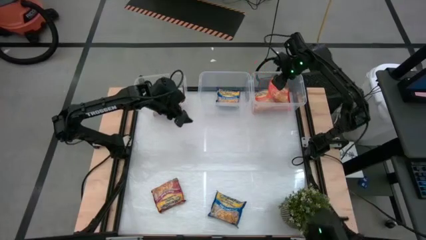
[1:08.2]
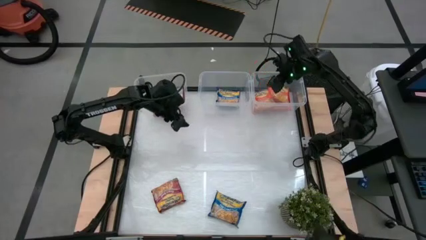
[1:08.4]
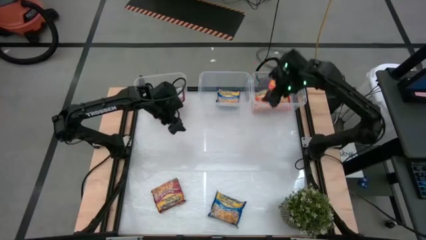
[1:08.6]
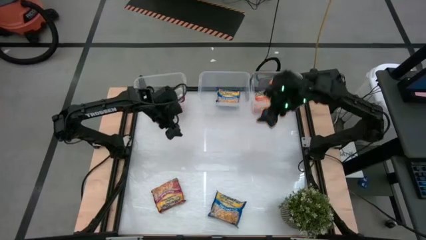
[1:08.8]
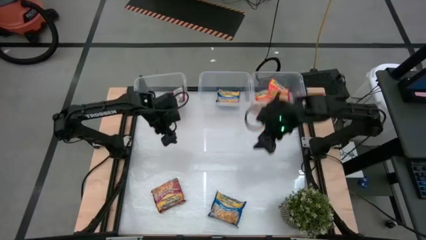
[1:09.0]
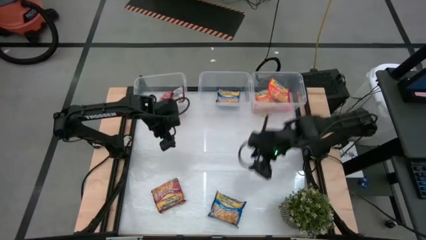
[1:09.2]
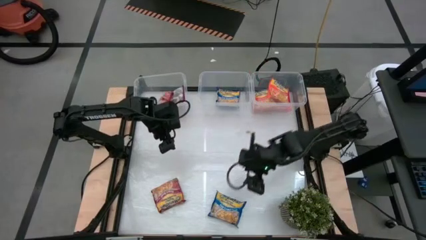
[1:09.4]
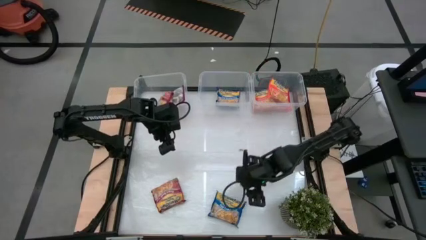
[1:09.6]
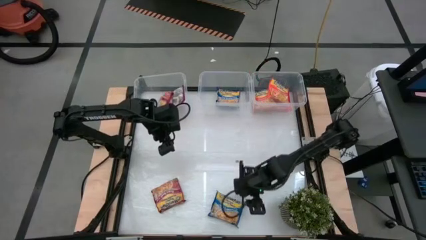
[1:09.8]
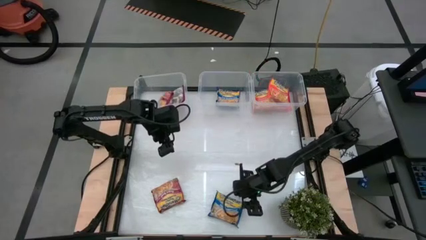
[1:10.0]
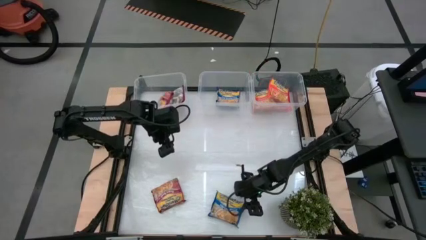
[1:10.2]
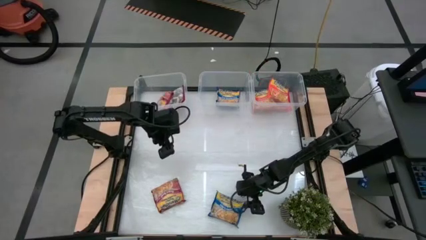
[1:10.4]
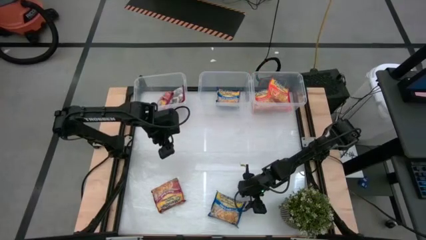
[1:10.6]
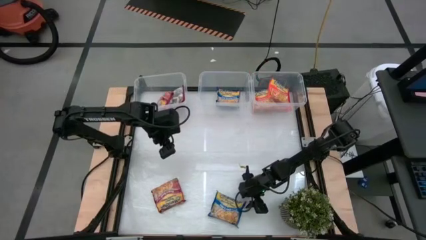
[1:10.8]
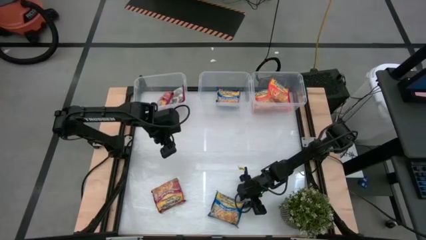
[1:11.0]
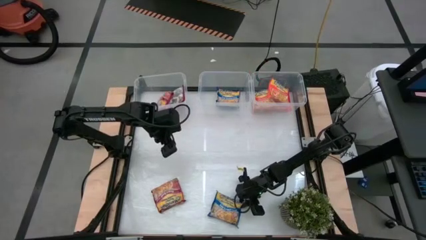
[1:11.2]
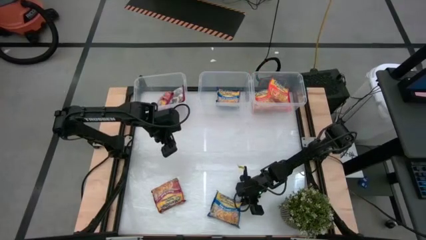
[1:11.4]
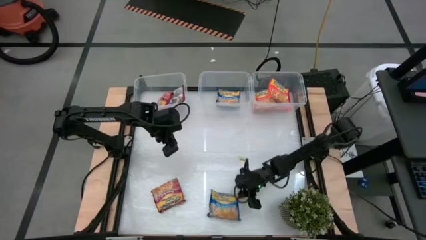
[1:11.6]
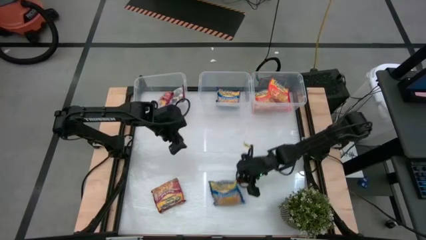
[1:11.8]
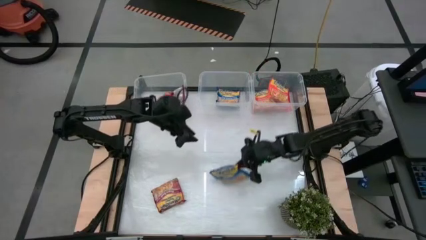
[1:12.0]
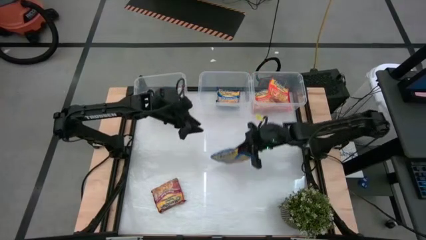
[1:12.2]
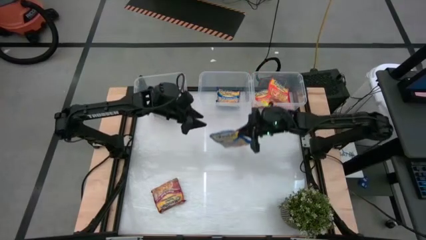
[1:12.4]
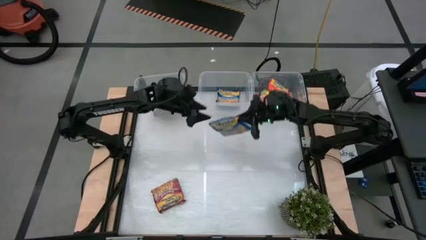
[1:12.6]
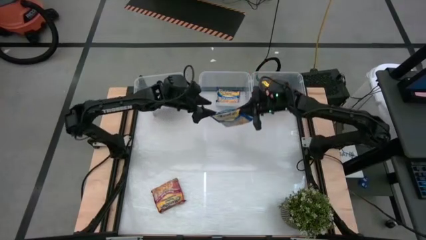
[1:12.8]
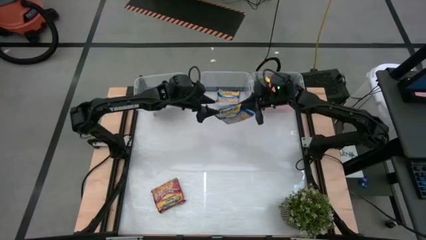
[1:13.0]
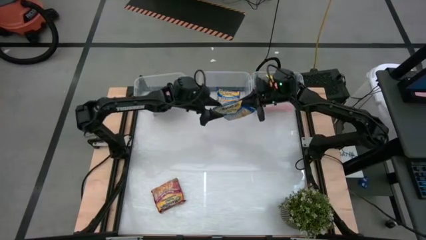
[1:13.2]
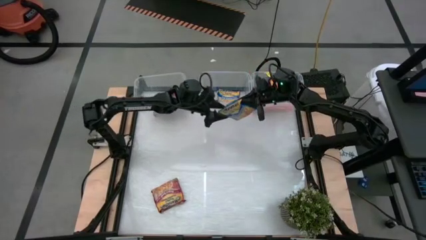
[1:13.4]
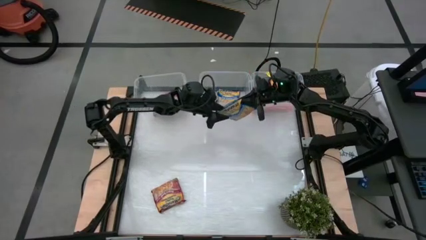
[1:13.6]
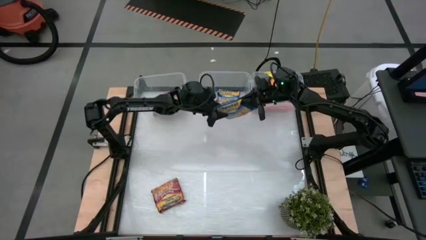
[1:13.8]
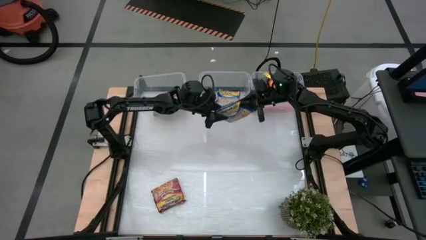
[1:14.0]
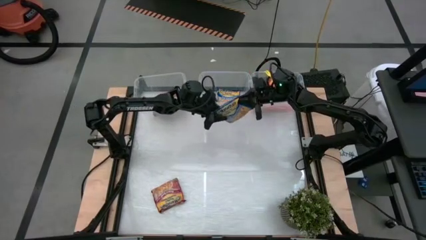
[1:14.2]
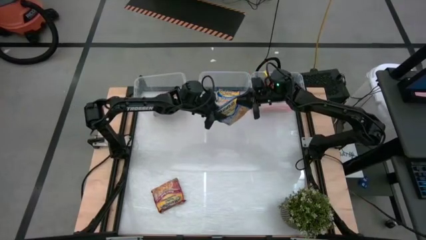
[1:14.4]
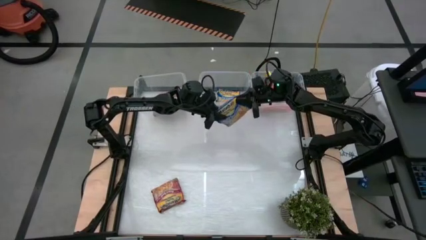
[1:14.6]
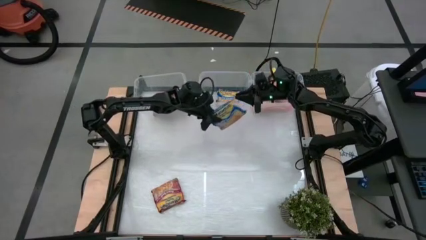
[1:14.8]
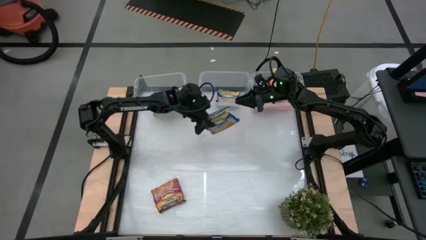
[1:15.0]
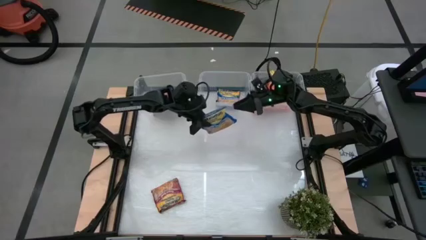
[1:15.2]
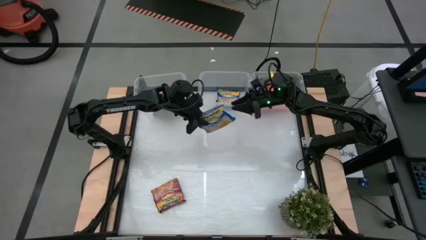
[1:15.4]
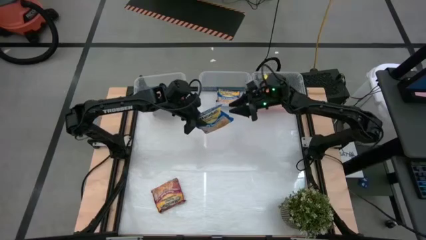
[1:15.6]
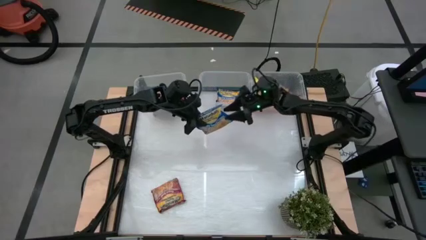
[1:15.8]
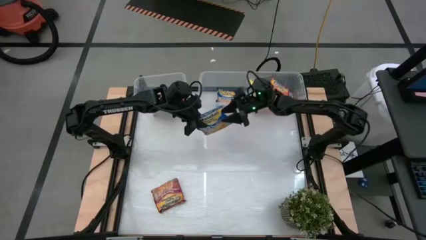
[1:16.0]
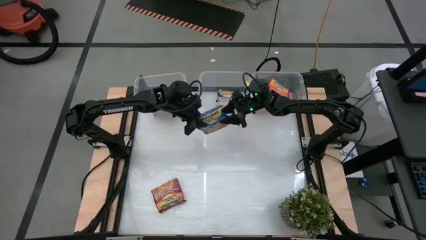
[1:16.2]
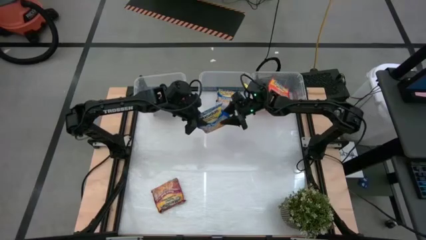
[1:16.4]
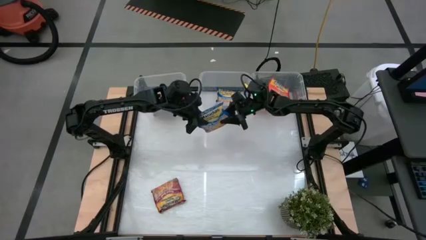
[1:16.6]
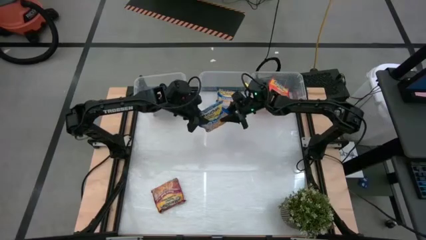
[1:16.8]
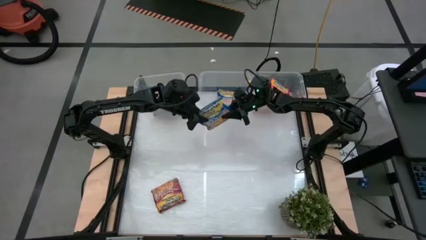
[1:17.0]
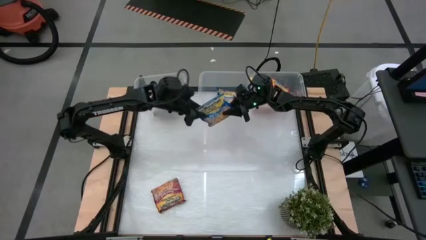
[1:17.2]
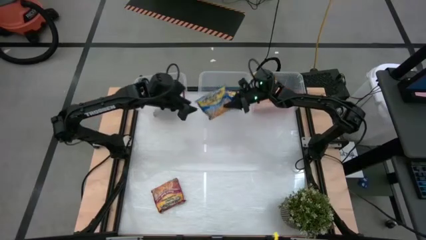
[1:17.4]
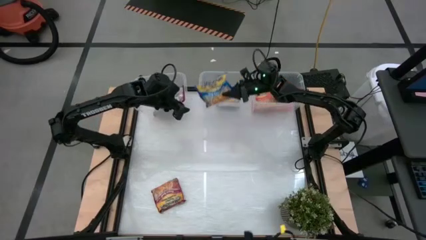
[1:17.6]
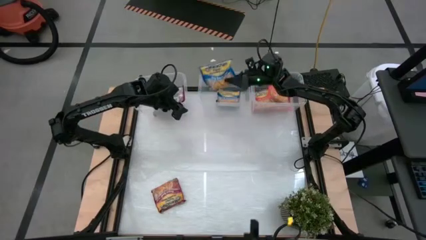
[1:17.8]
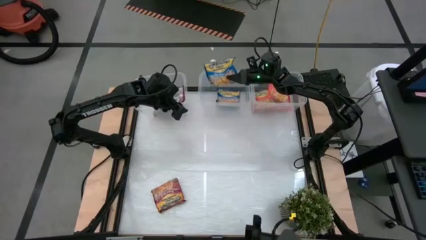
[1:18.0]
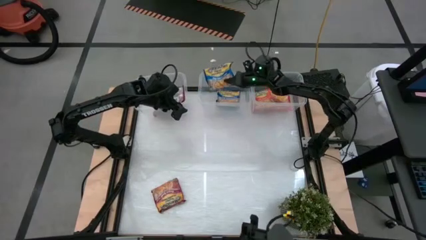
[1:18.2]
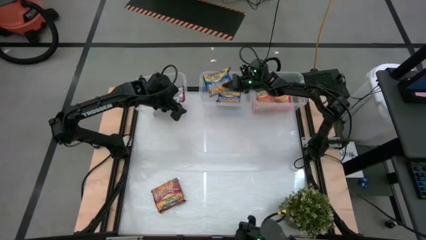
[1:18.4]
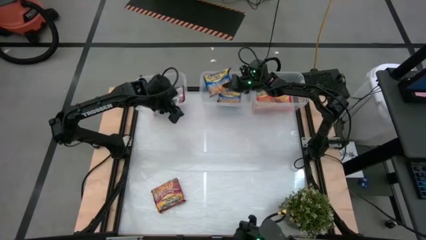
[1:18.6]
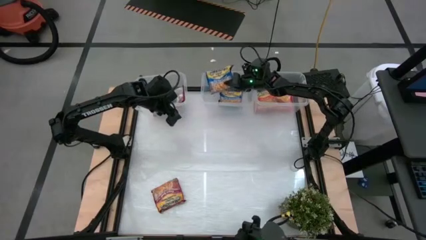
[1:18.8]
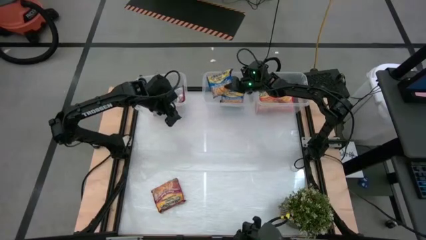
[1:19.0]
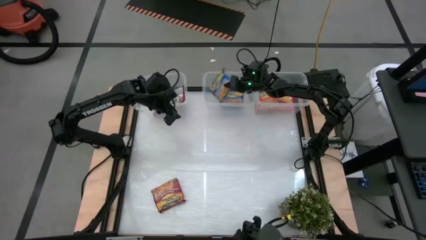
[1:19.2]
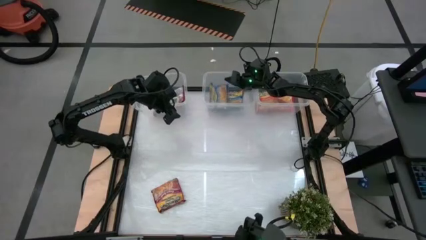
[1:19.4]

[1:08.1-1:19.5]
Task: Sort Maruchan noodles
Put the blue noodle pack into the middle transparent bin

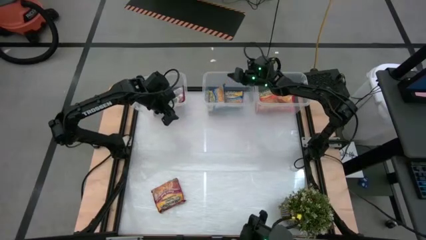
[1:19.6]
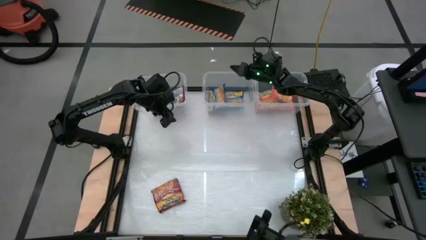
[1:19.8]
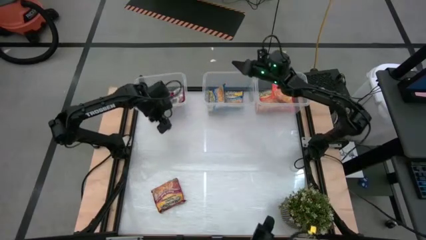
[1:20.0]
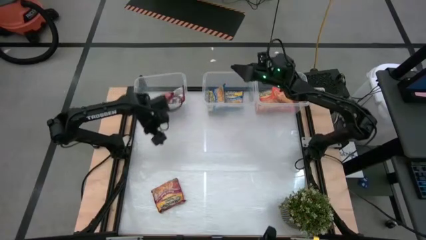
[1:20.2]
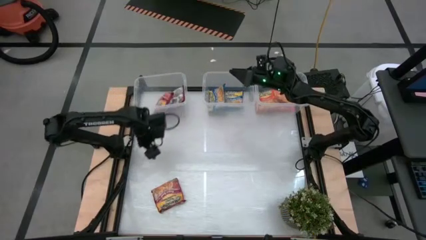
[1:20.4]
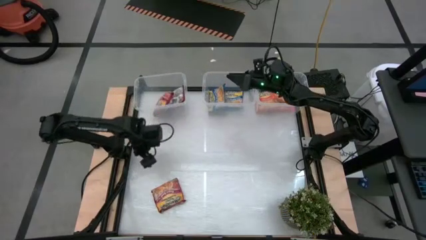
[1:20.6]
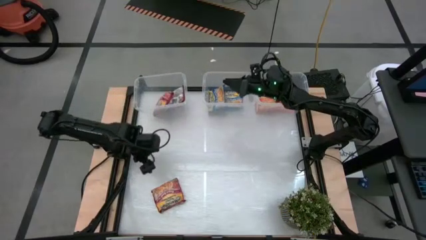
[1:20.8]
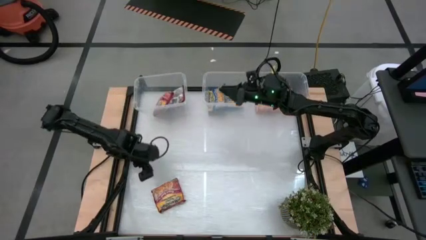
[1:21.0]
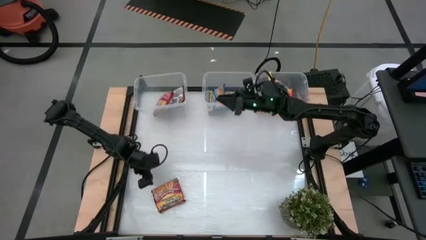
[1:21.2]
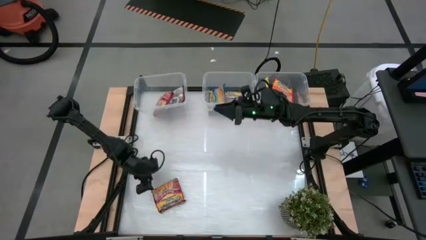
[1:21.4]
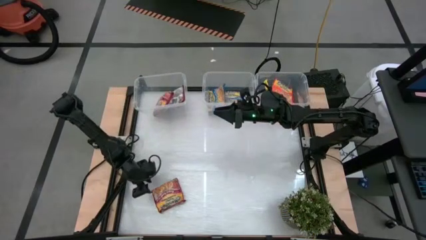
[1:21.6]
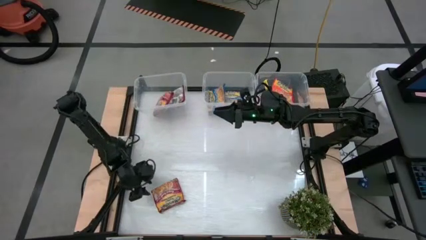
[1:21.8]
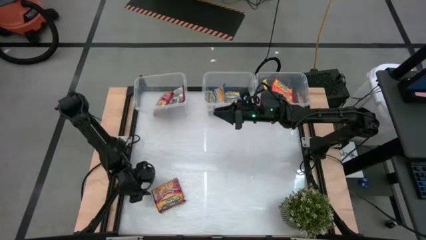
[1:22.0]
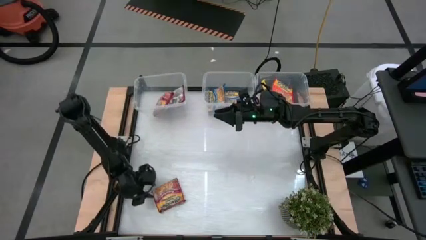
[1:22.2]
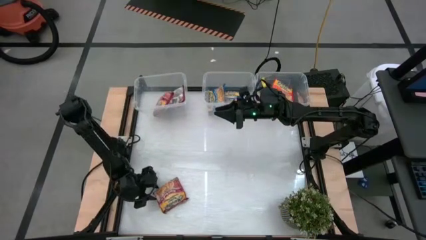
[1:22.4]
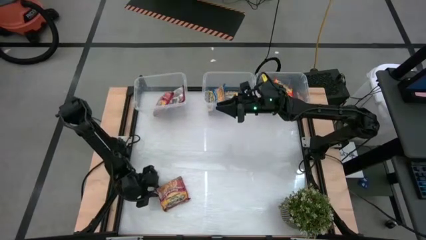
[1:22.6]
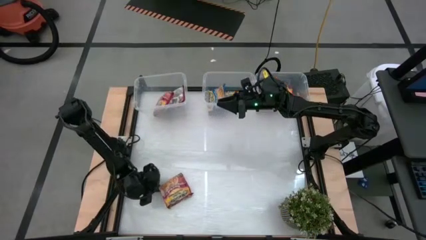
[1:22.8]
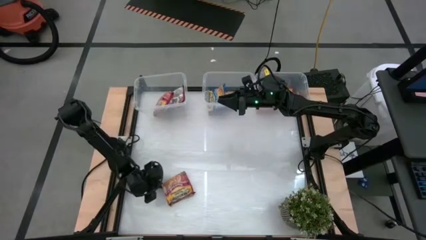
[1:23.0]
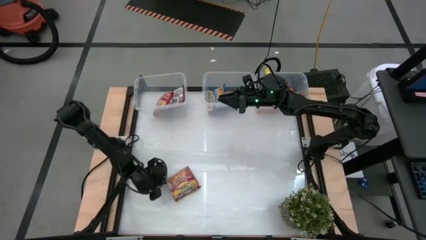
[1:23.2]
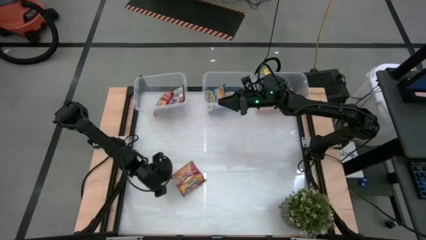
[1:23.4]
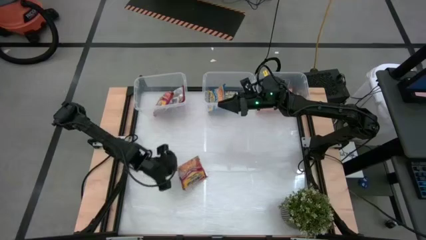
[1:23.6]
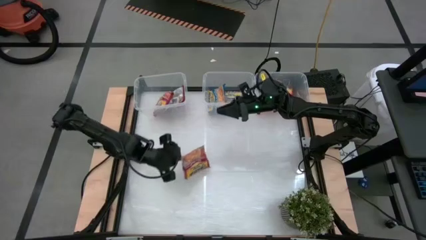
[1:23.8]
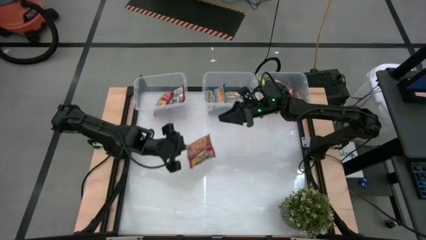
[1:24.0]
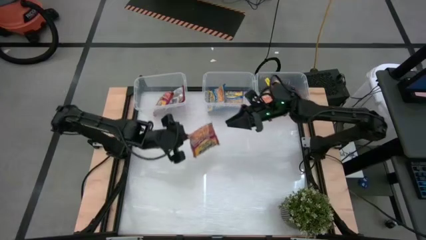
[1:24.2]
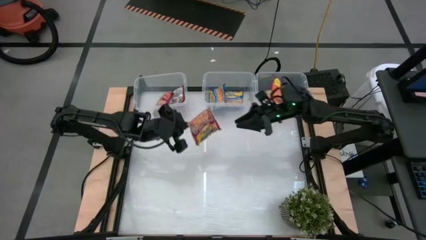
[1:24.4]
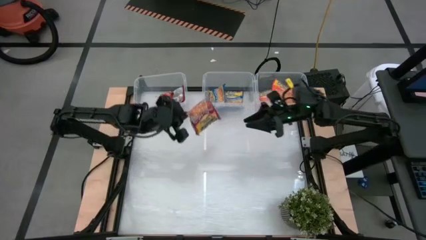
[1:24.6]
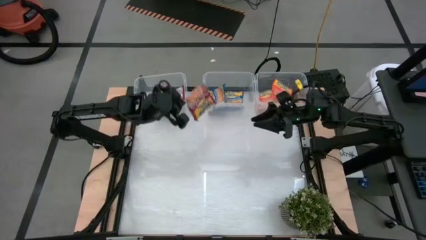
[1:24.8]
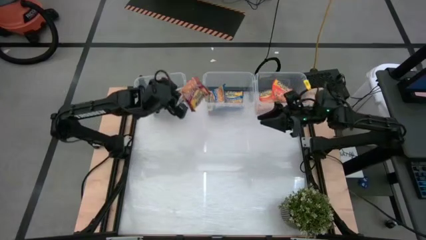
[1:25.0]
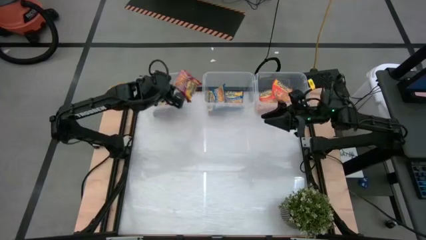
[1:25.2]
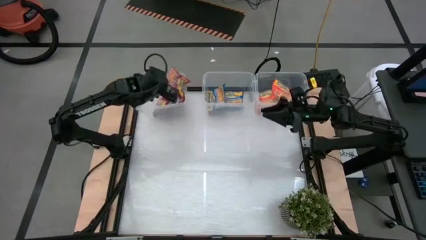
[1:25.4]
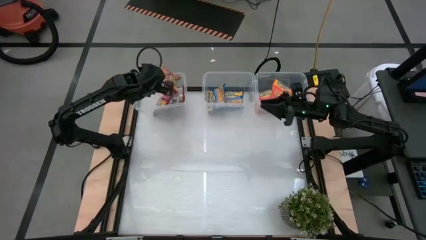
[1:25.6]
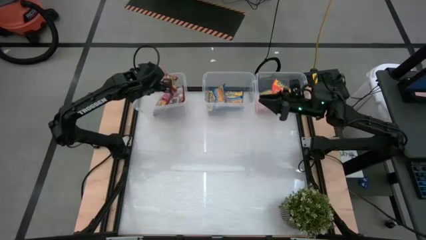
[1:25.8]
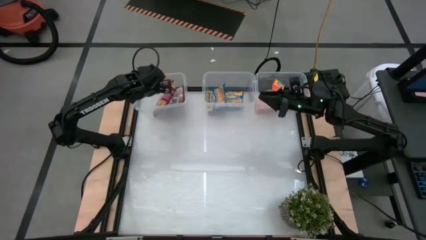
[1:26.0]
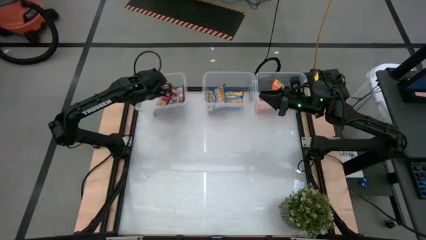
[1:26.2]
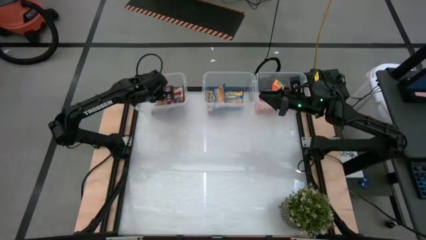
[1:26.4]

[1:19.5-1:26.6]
Put the red noodle pack into the left transparent bin
